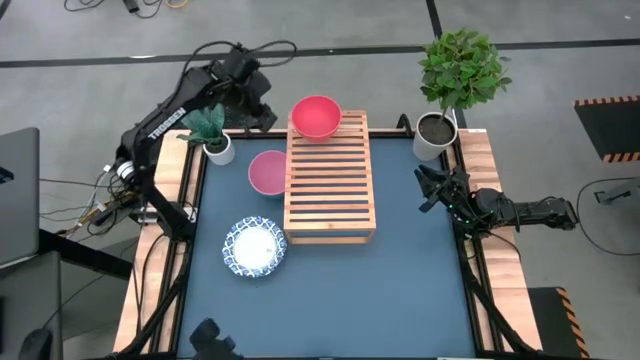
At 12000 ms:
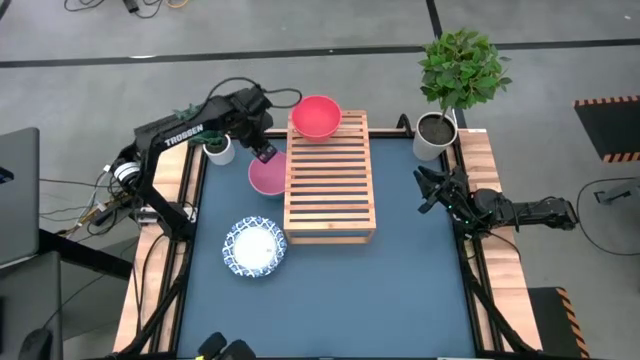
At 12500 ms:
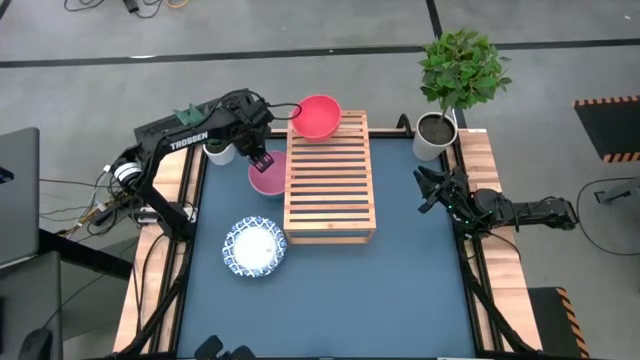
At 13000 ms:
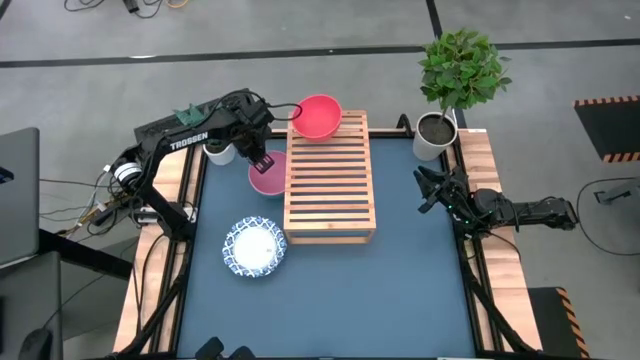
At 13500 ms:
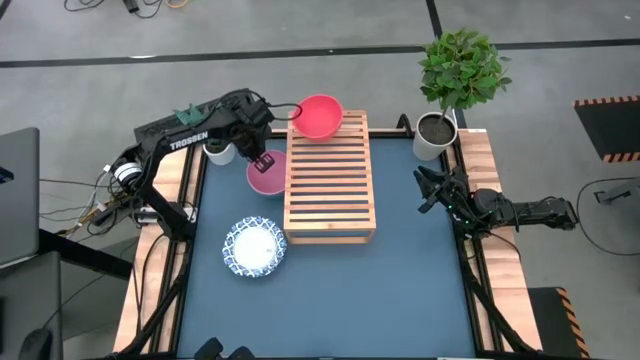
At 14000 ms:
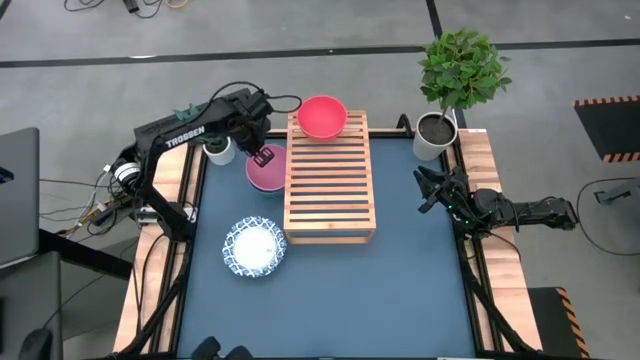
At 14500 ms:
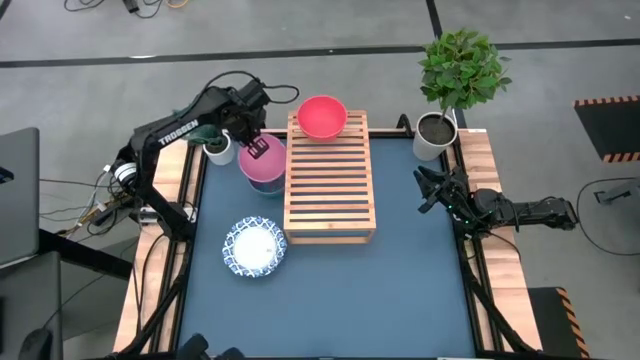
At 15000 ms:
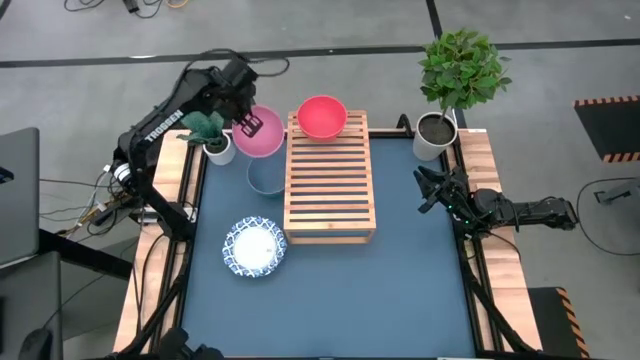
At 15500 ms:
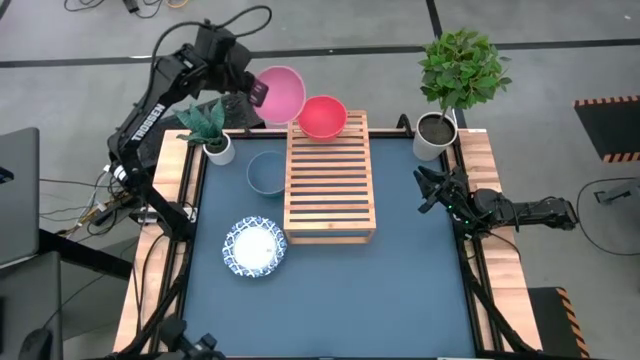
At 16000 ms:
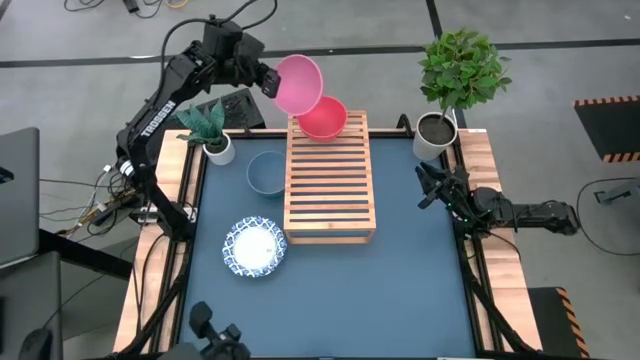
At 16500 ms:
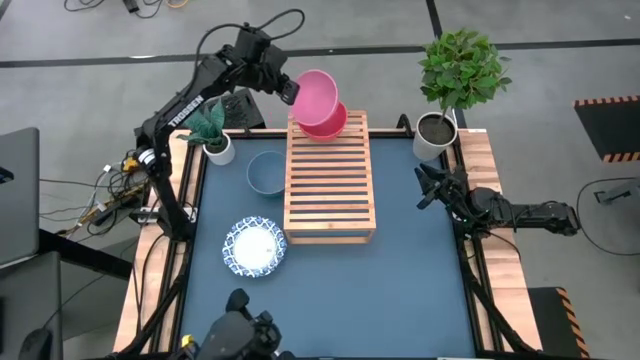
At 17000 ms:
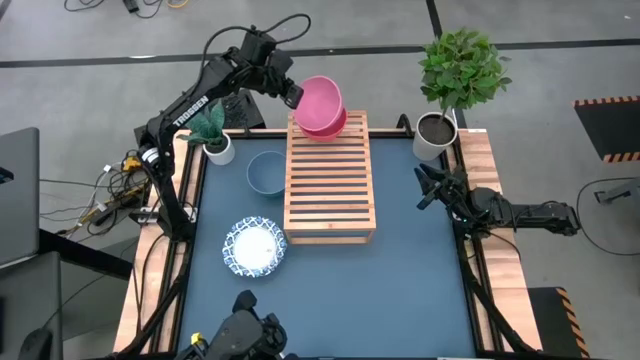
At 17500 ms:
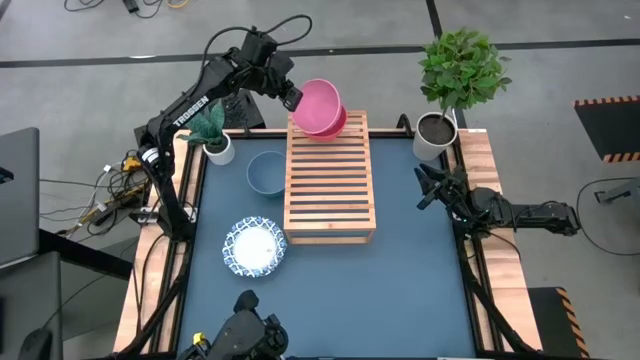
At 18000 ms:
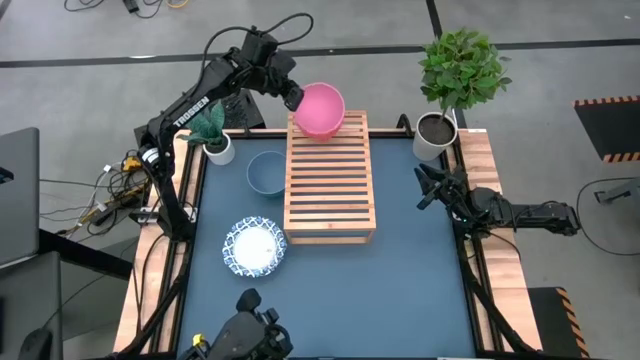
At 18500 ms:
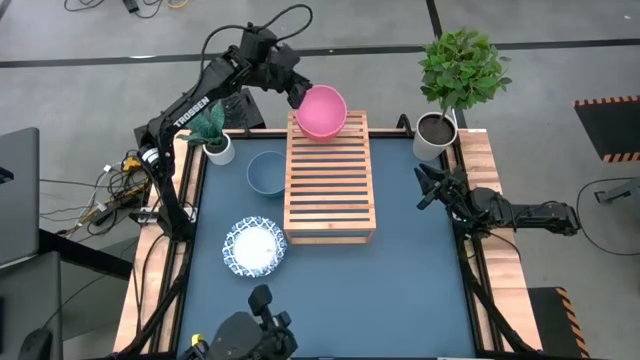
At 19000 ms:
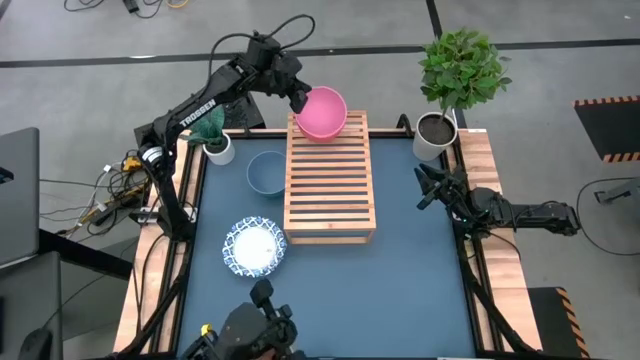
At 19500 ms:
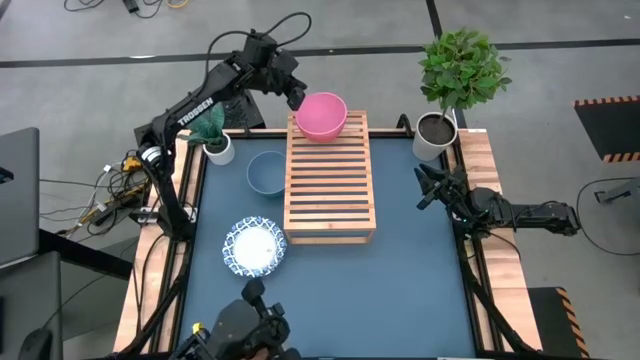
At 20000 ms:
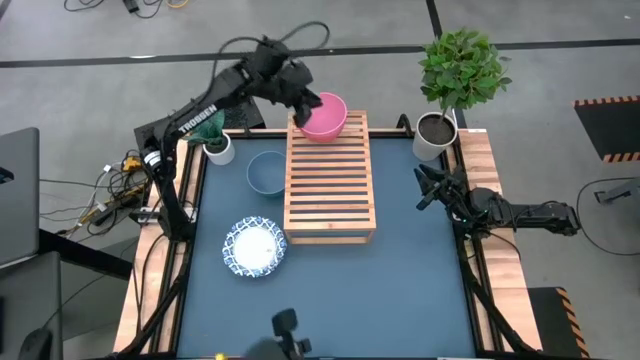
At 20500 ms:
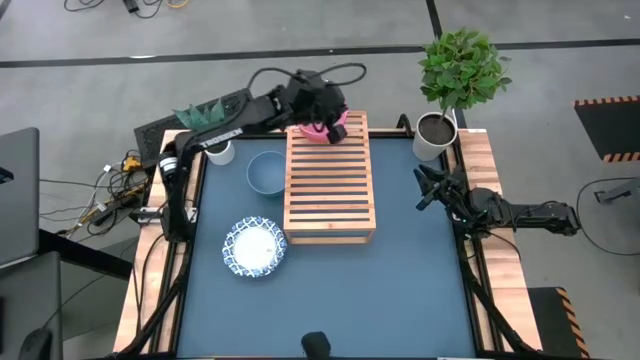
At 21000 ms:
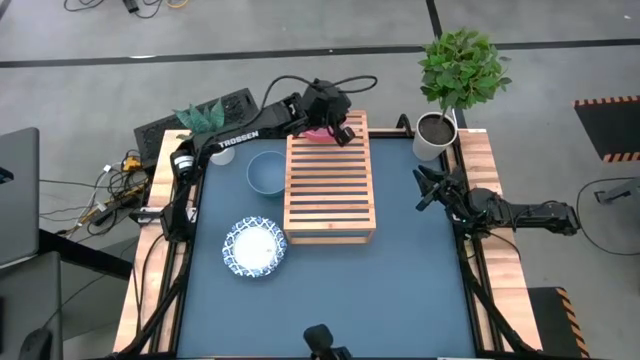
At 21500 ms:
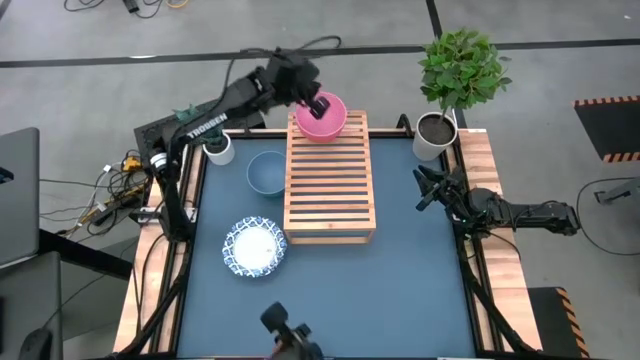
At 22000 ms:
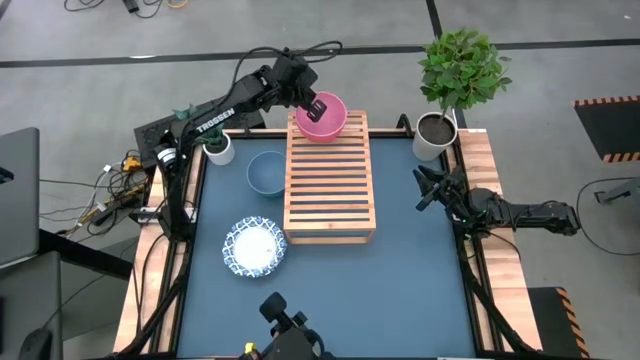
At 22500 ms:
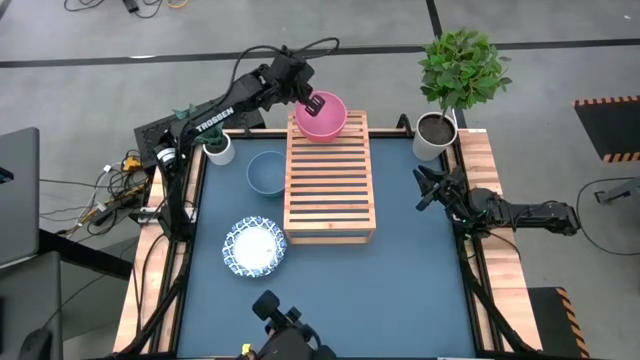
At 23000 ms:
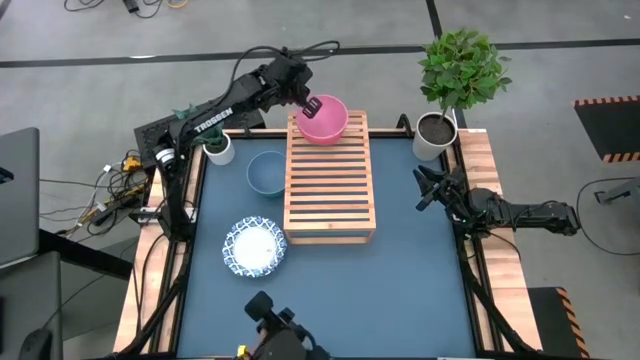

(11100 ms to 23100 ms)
Task: Place and stack bowls onto a shelf
Stack the pink bowl on the the red bowl

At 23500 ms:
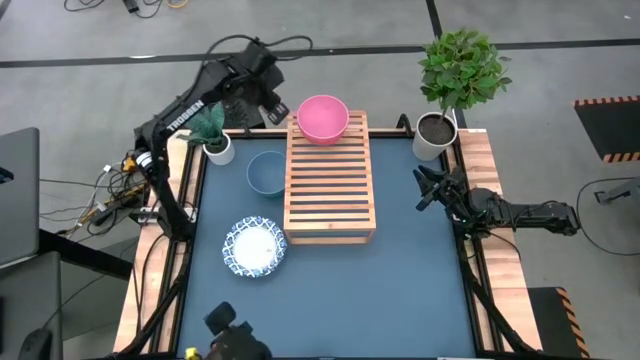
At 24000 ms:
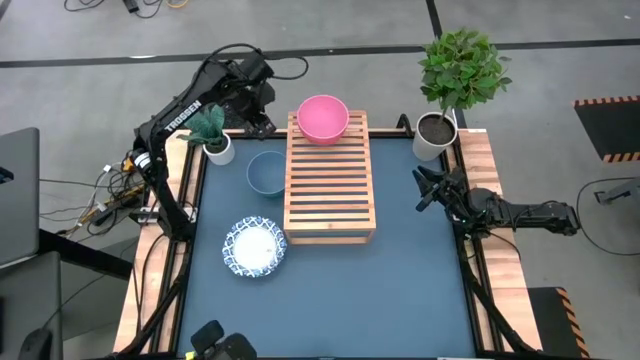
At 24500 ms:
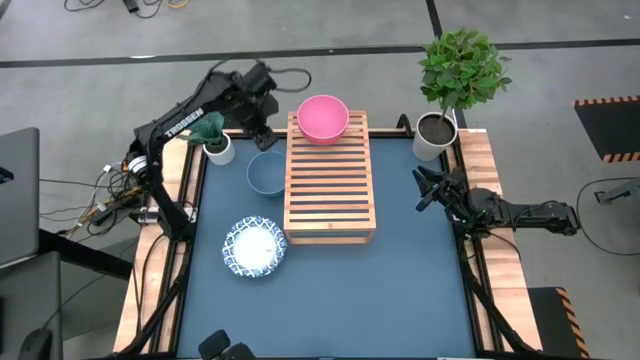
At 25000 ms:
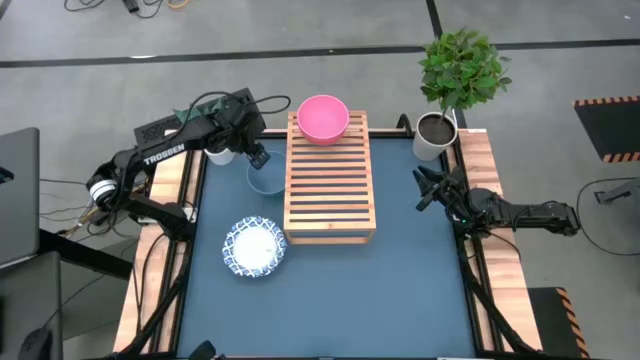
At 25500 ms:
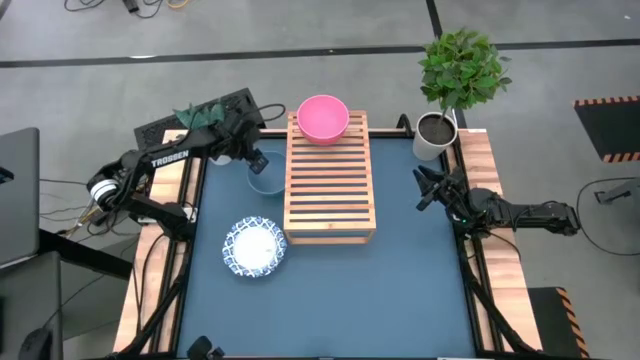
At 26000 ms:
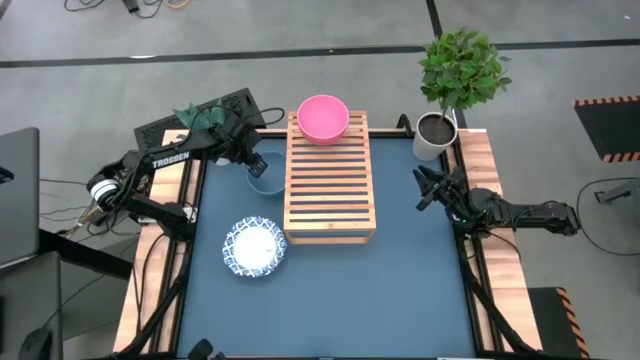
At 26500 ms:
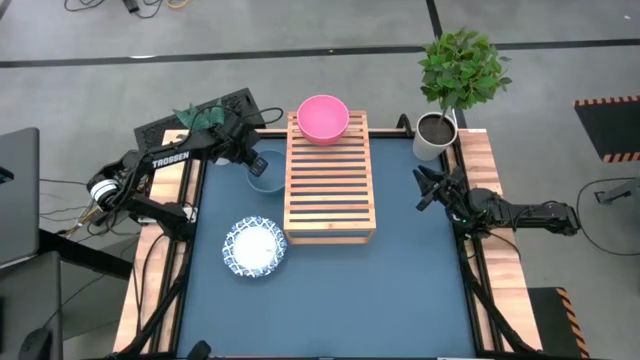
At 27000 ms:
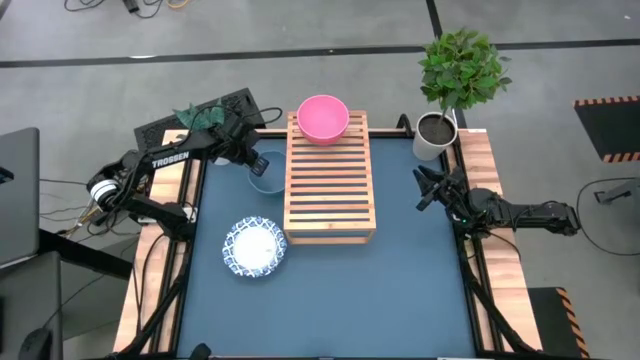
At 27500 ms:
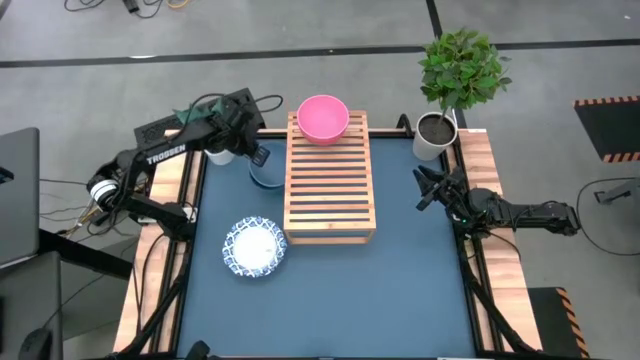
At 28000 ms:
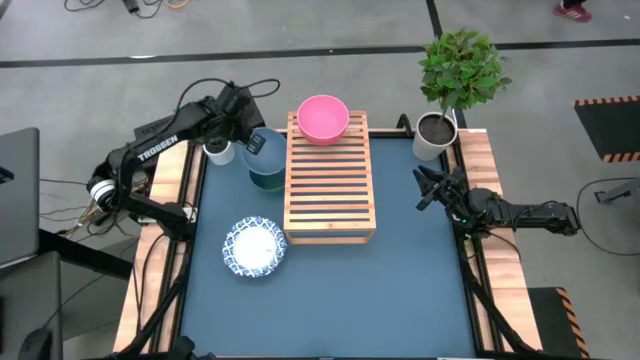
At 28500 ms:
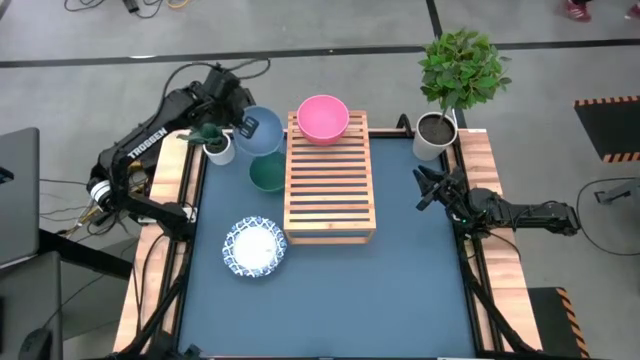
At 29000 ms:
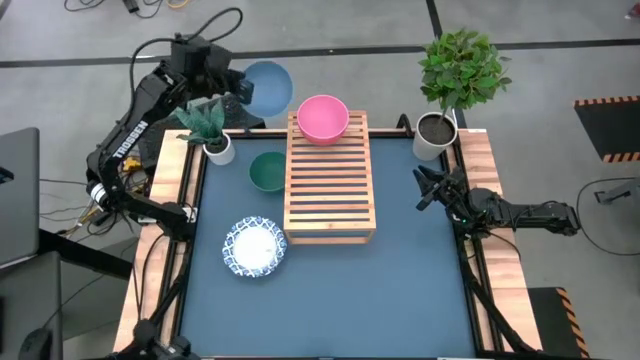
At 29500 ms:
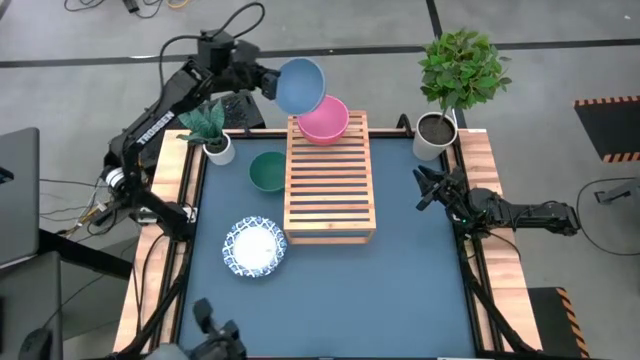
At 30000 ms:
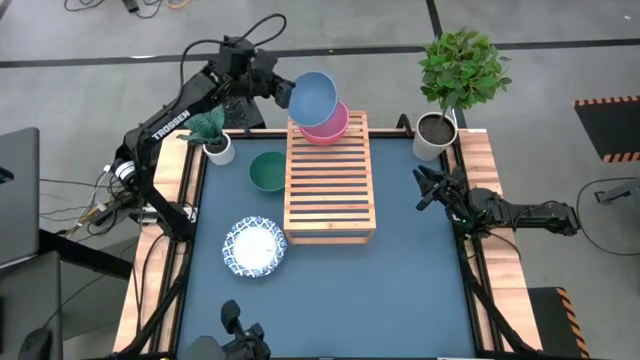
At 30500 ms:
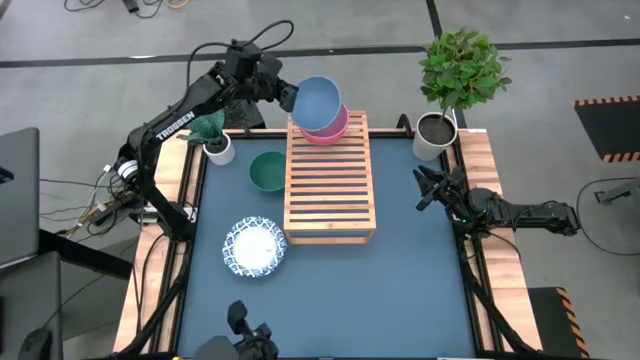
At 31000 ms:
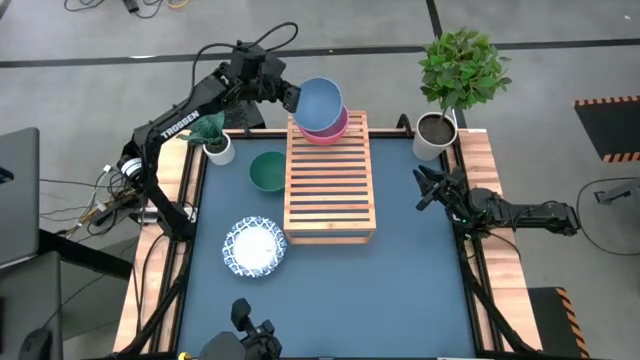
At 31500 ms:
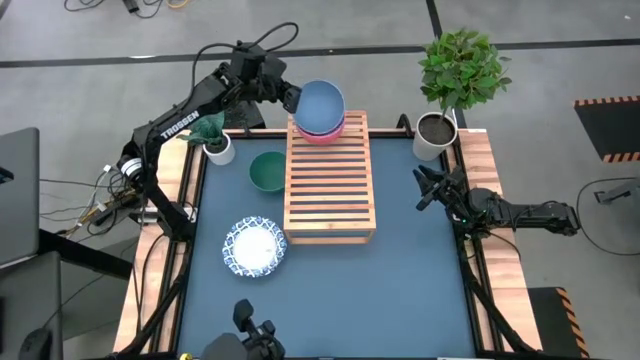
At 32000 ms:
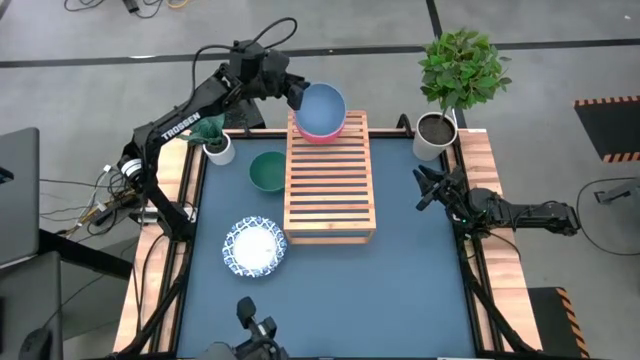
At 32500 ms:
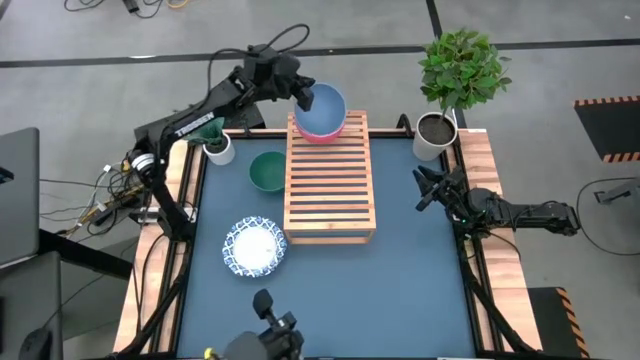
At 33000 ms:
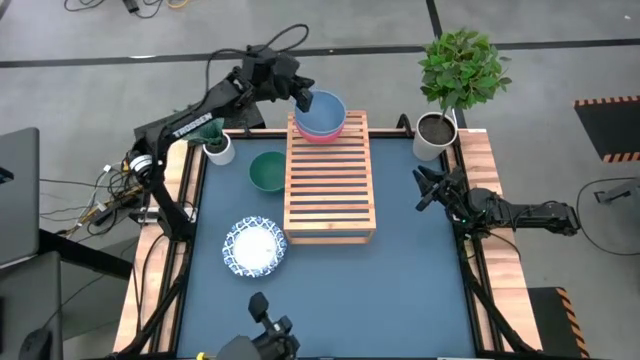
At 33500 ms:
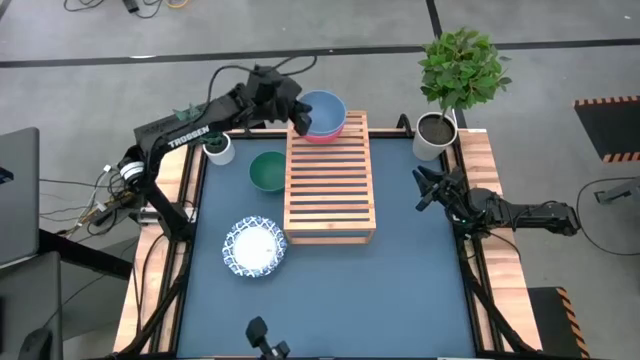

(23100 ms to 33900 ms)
Stack the blue bowl on the the pink bowl
